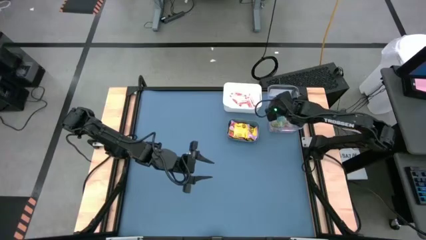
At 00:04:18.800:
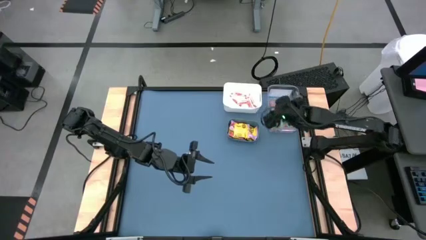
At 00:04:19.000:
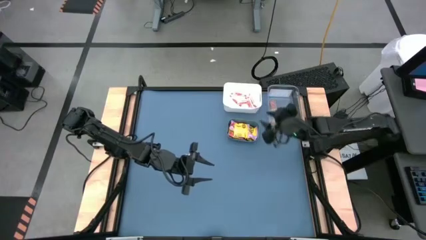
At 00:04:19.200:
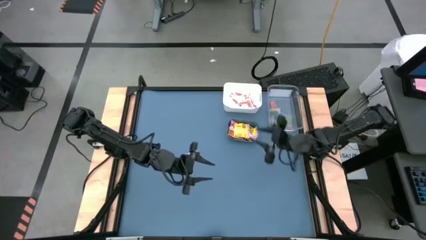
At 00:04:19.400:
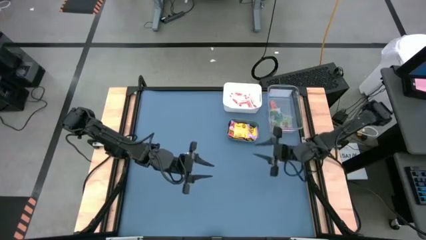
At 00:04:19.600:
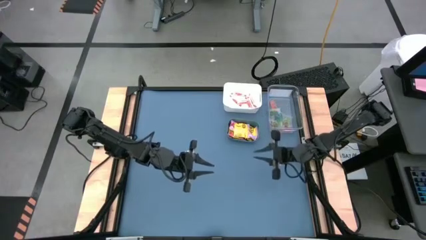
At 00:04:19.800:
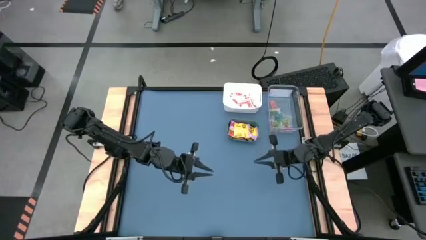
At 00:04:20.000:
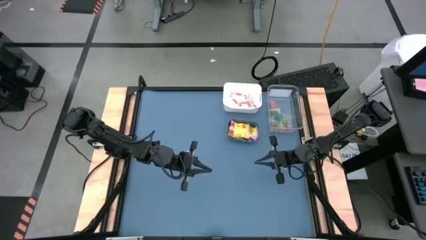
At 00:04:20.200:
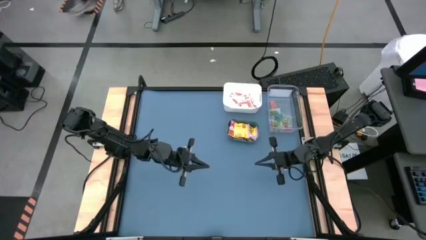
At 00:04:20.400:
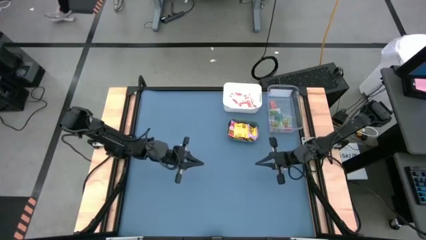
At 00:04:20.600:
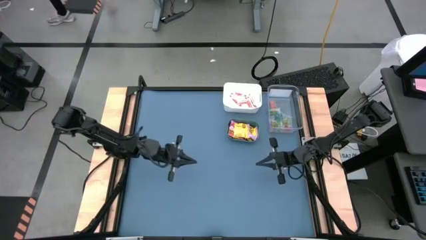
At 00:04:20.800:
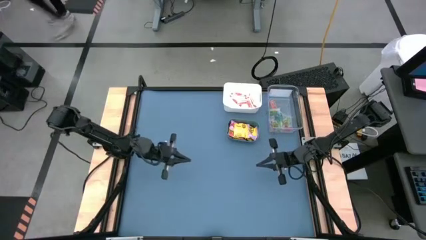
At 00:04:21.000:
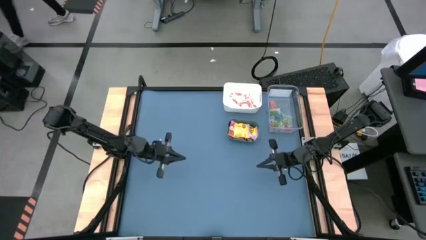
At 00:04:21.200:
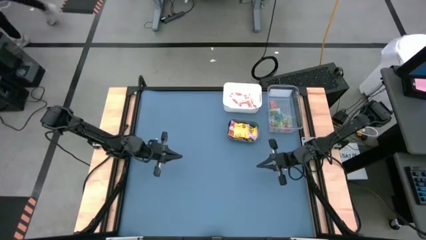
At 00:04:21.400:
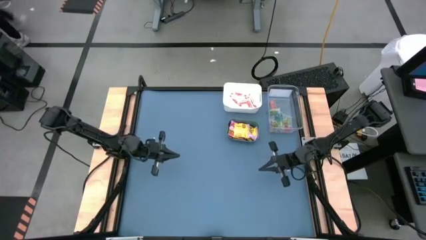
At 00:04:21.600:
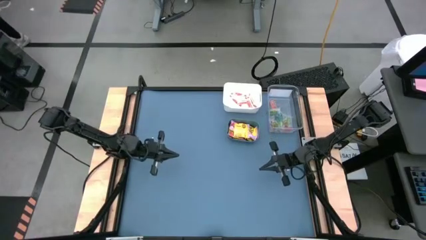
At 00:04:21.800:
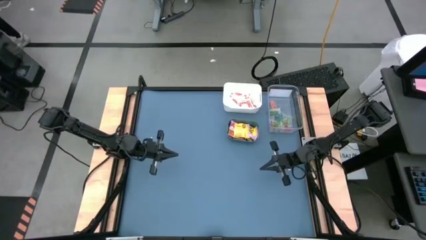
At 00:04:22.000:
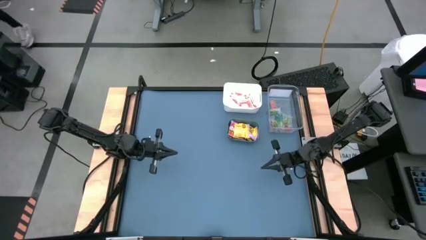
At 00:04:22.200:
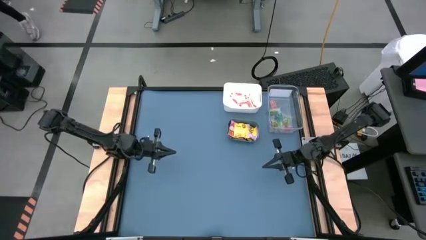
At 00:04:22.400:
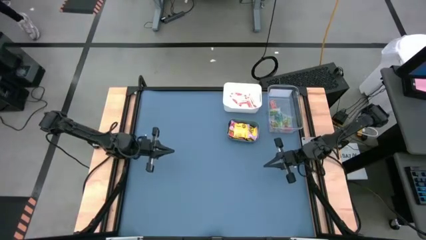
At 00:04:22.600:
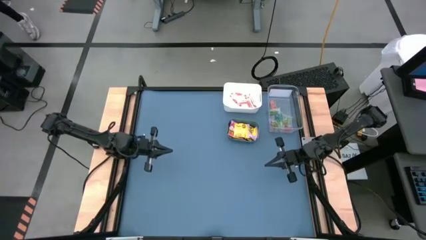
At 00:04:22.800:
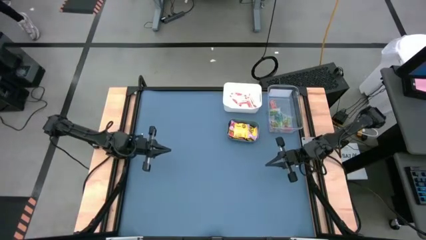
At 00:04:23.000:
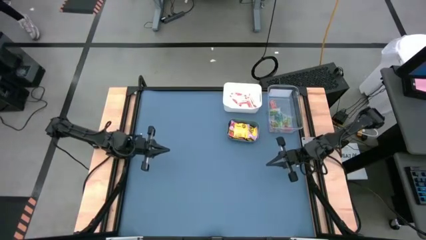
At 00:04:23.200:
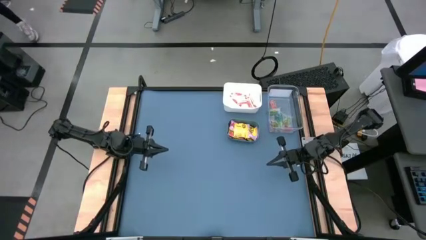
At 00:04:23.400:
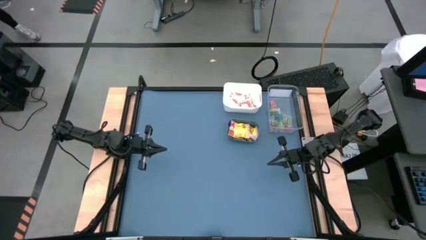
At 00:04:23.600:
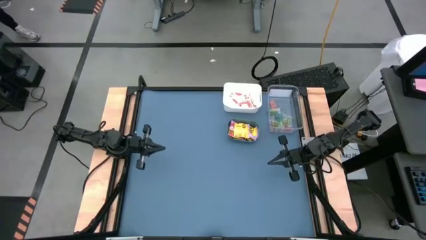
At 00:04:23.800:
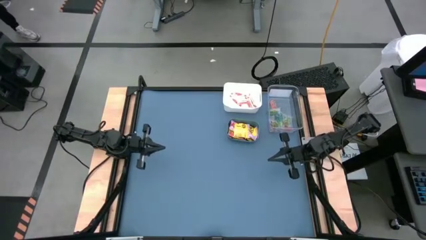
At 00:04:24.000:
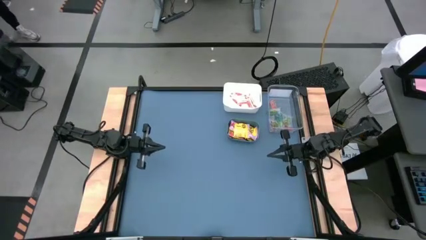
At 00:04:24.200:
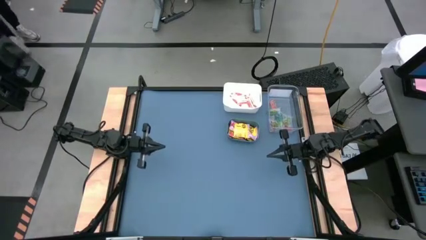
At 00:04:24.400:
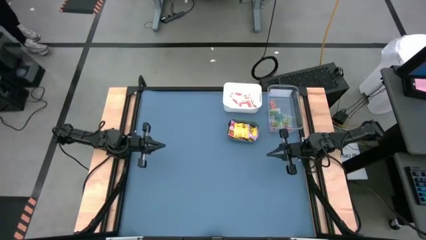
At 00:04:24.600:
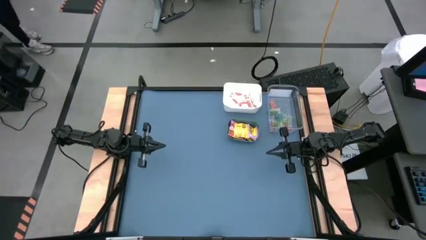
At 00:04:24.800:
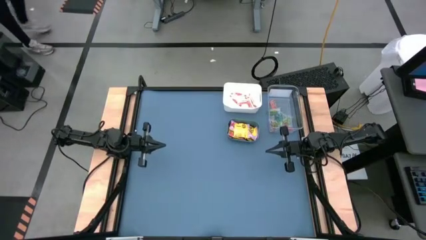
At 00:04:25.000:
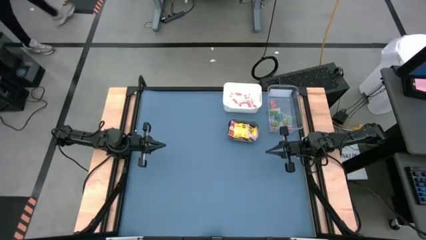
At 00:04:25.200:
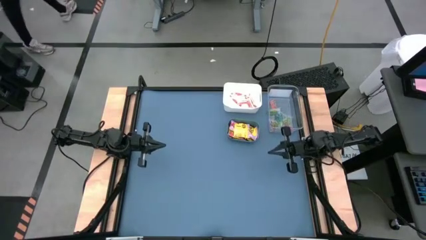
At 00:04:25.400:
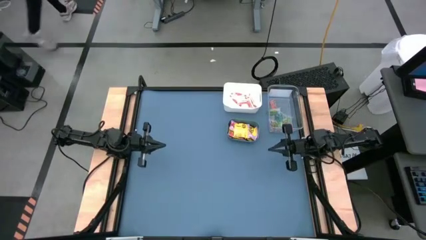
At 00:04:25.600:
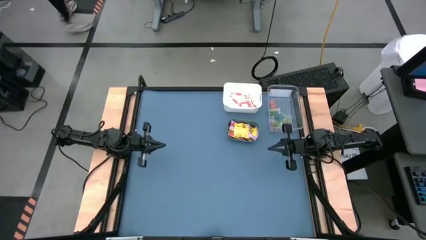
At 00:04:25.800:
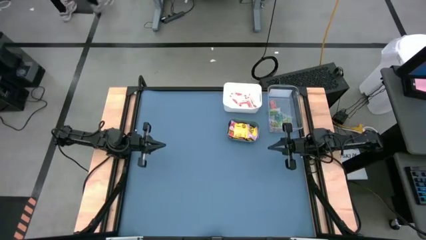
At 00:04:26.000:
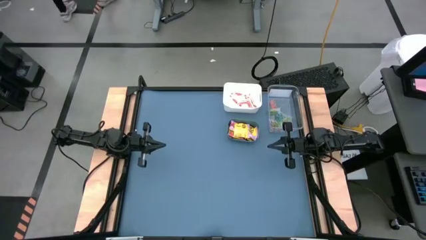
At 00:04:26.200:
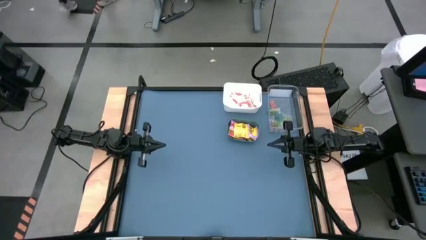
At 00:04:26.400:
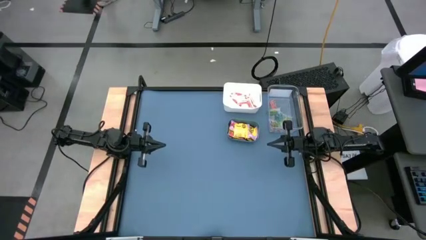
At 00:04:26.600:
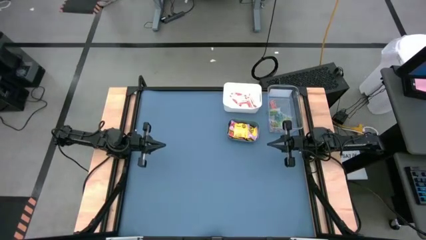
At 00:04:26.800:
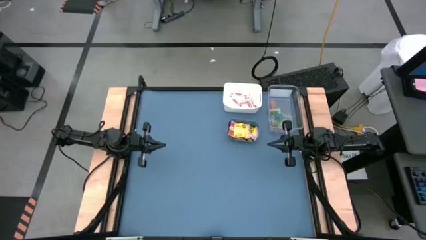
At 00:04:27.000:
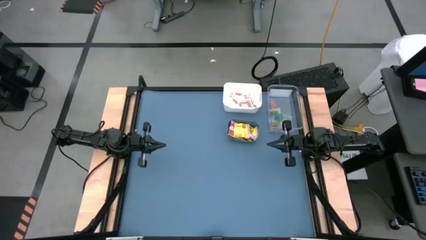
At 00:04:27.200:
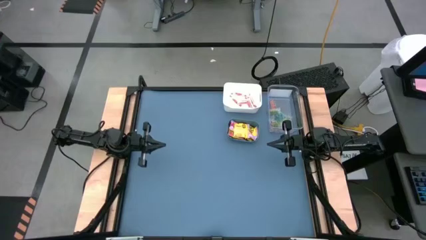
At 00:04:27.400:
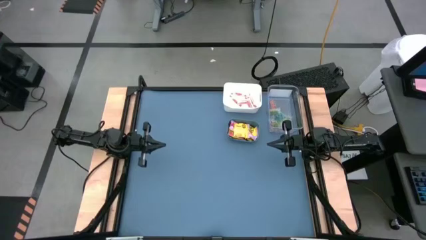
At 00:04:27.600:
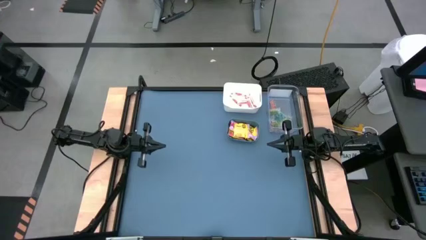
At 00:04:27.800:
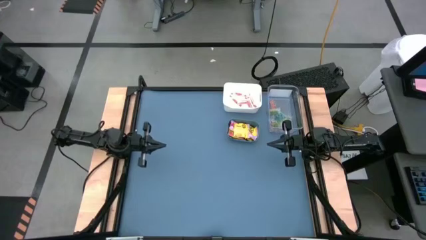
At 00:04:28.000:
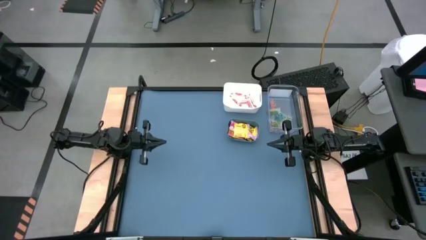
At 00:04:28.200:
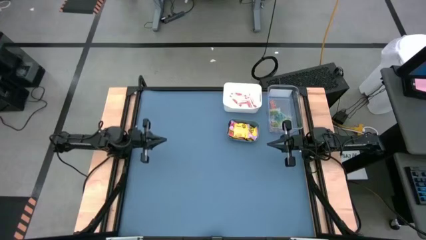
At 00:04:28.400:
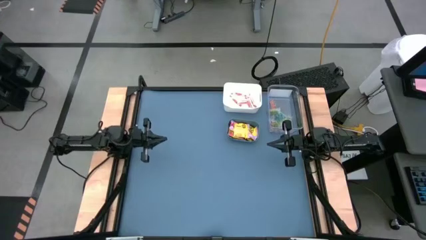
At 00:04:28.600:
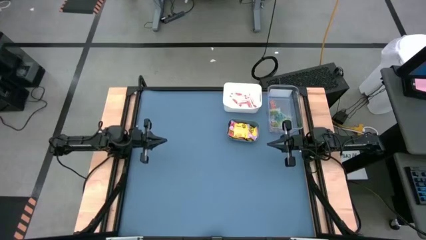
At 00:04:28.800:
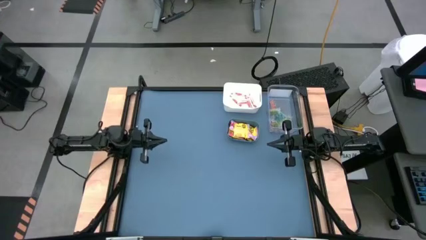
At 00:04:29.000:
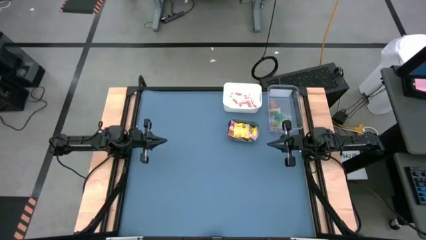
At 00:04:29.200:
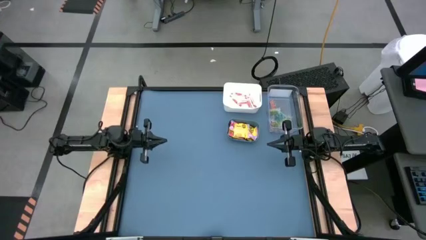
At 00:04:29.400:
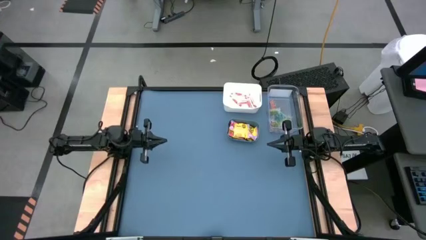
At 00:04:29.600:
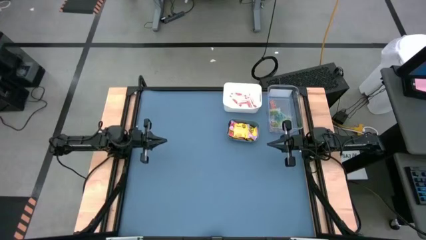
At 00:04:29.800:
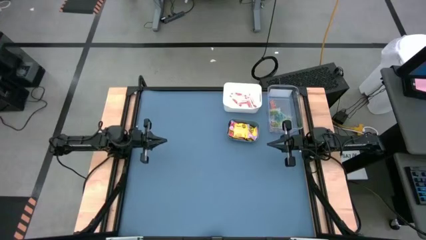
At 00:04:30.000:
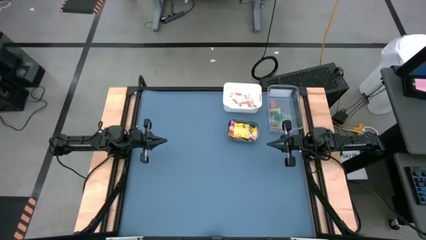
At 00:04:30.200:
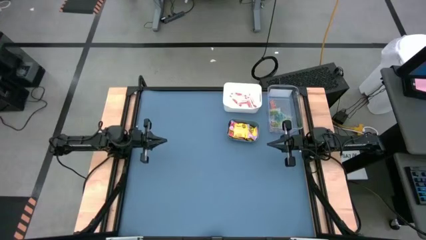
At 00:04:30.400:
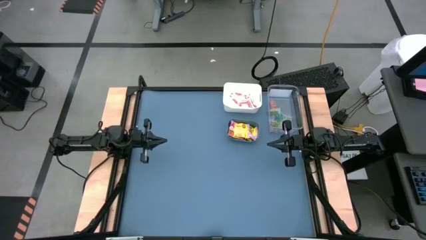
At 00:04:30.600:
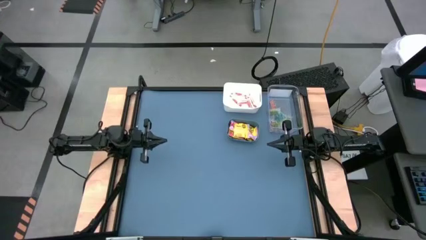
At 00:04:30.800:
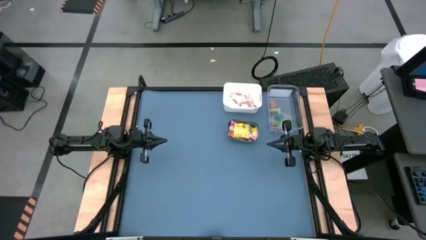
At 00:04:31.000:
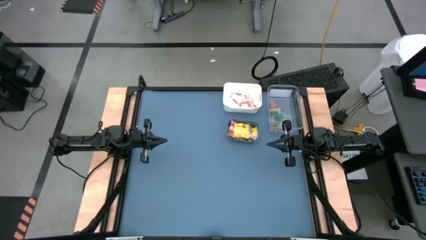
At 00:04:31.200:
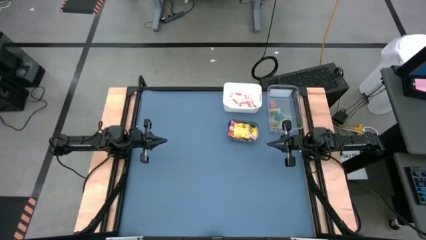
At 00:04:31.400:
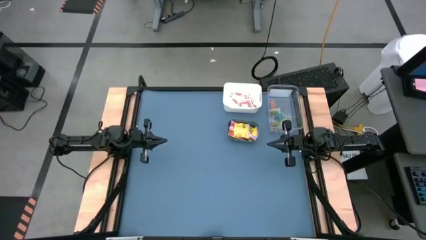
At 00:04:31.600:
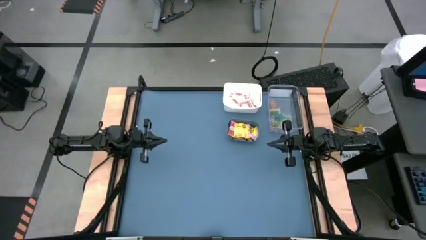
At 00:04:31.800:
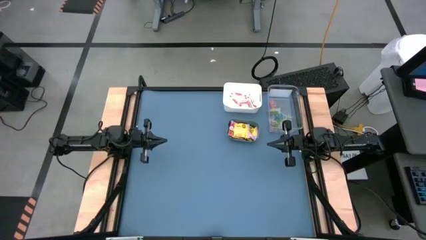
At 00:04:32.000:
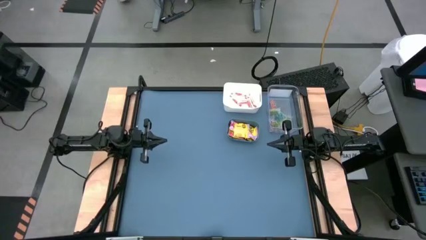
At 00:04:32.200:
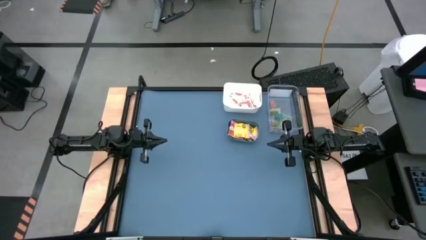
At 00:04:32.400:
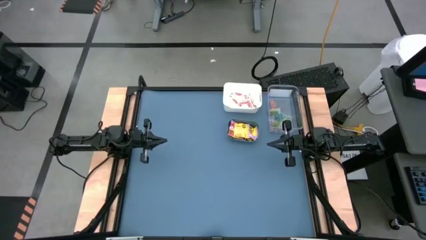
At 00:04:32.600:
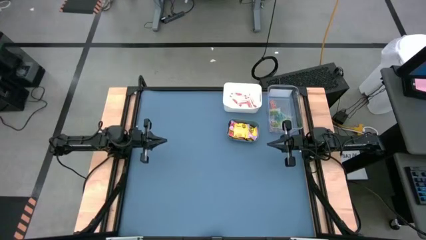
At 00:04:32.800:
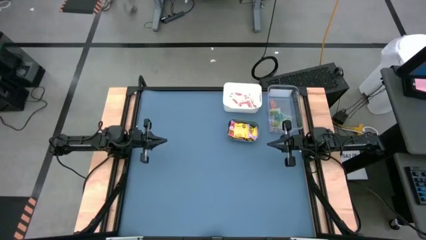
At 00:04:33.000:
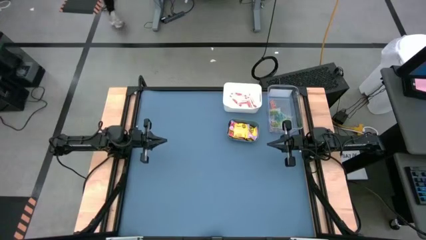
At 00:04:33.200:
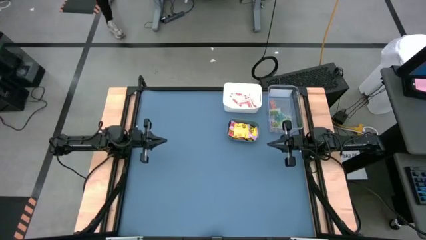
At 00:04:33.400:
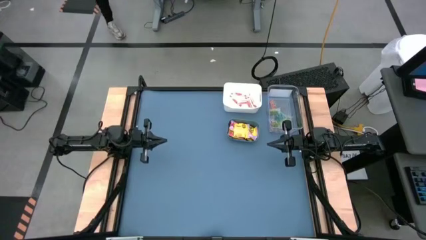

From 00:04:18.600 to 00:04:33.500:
Task: Sort candy
Return to Home Position

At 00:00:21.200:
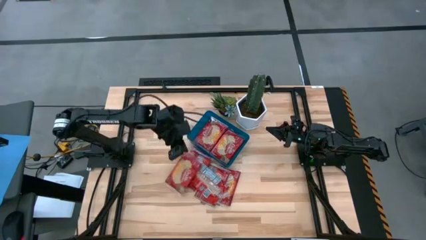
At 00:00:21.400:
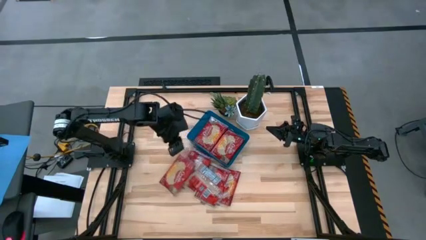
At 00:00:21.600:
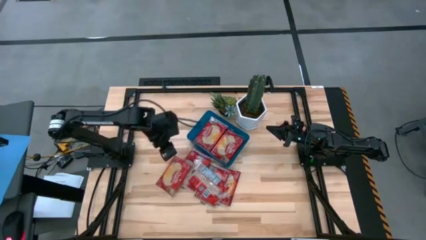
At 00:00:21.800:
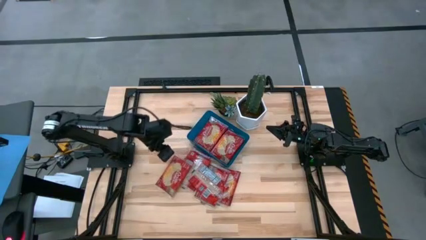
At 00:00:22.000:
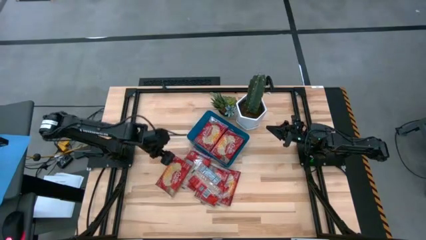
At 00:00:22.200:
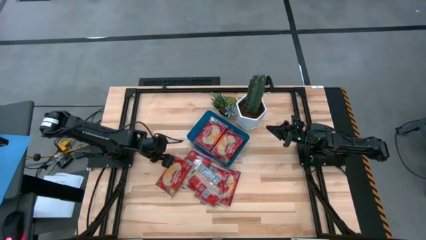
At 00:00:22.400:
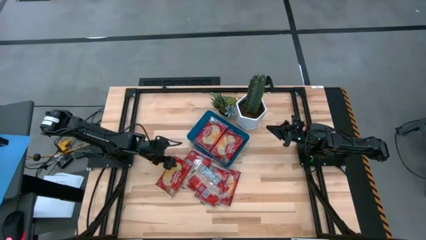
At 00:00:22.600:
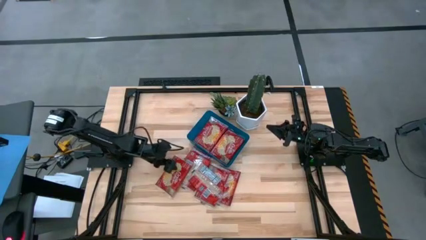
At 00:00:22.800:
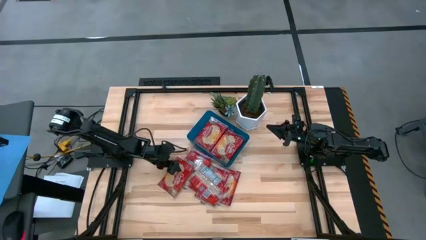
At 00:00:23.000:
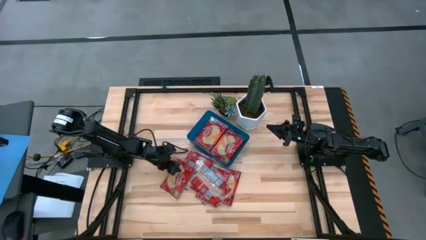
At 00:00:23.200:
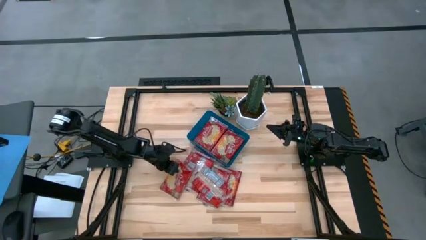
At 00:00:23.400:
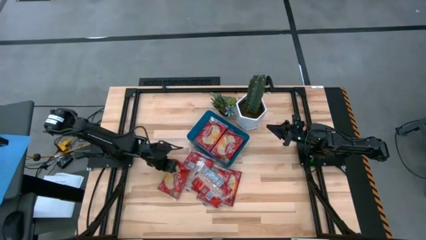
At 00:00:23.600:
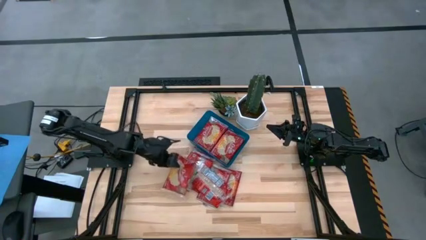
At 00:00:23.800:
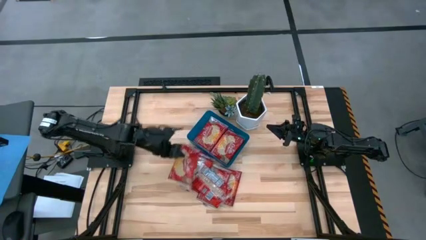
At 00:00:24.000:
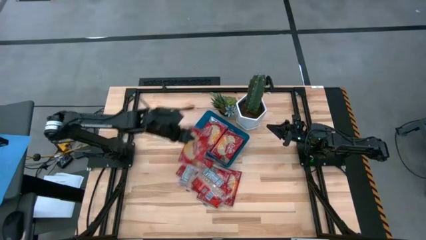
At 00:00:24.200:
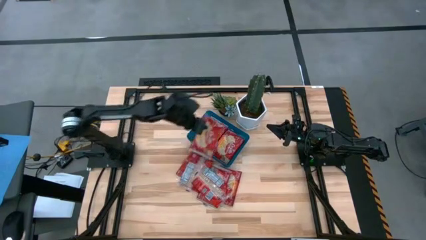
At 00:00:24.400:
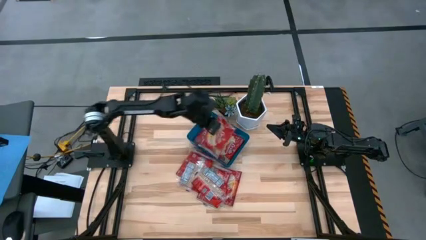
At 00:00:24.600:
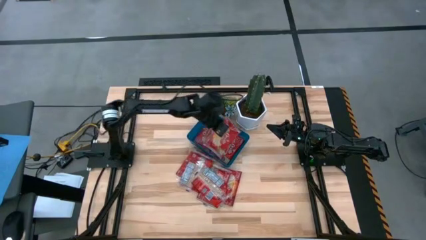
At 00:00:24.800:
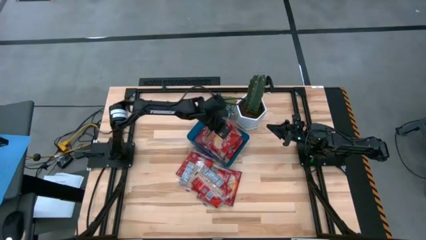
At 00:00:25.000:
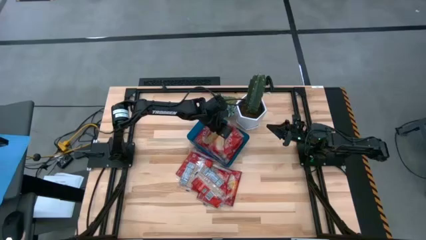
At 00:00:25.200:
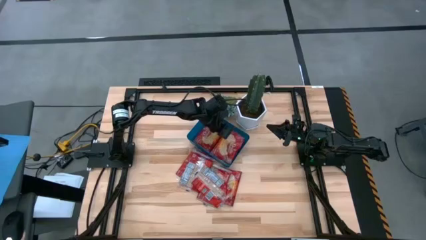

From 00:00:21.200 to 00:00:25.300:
Task: Sort popcorn bags into baskets
Put the popcorn bag into the blue bin
